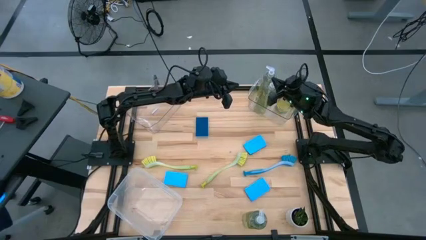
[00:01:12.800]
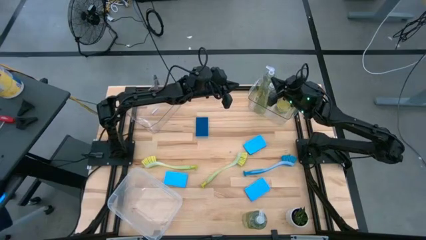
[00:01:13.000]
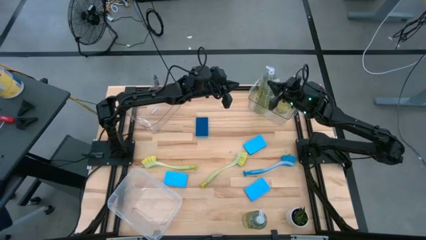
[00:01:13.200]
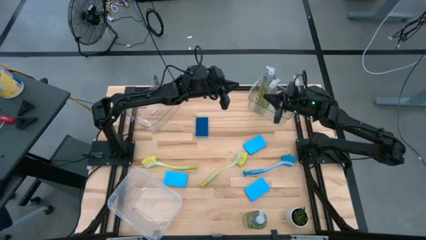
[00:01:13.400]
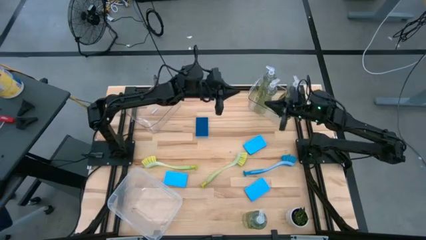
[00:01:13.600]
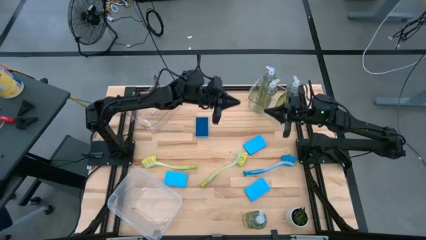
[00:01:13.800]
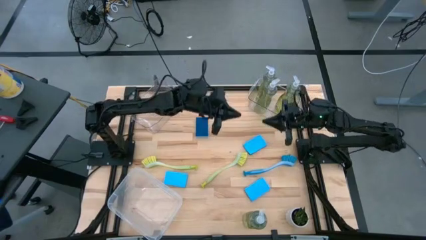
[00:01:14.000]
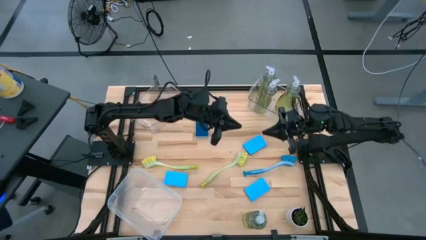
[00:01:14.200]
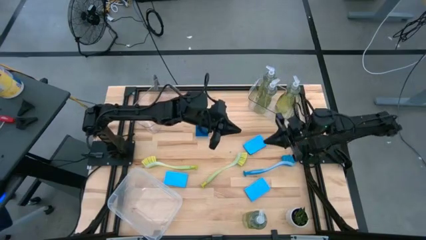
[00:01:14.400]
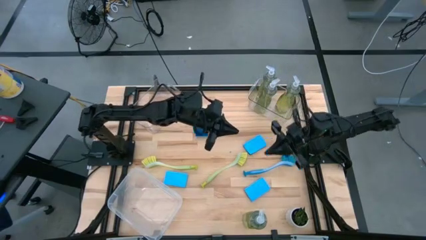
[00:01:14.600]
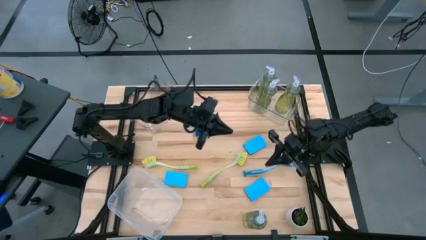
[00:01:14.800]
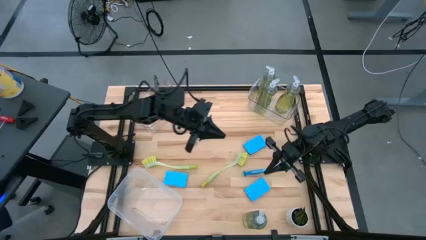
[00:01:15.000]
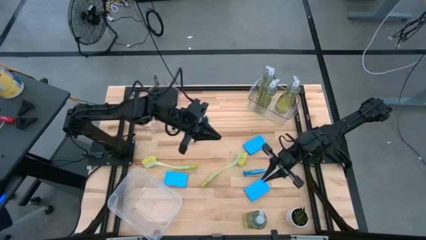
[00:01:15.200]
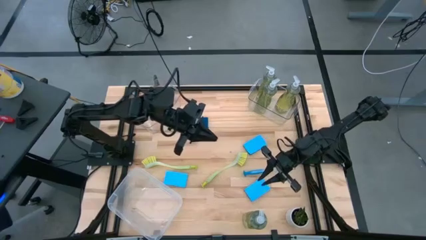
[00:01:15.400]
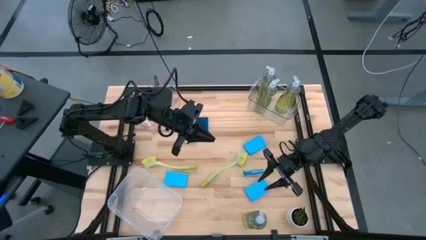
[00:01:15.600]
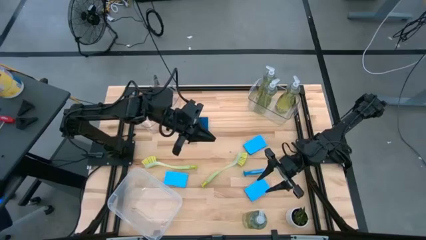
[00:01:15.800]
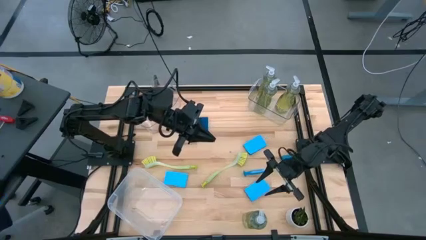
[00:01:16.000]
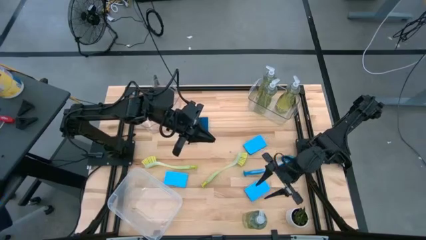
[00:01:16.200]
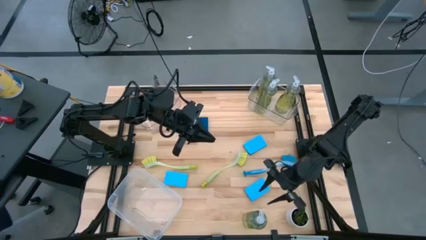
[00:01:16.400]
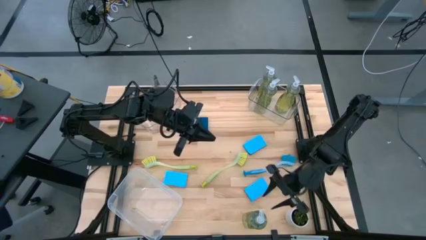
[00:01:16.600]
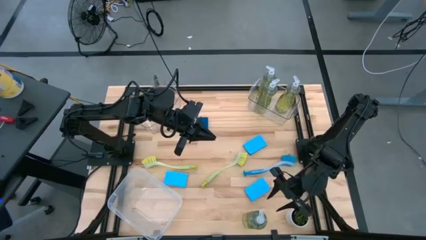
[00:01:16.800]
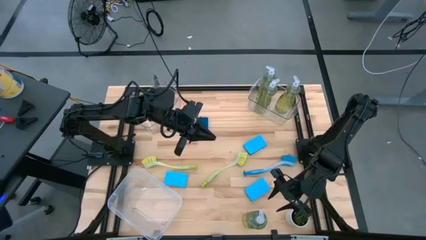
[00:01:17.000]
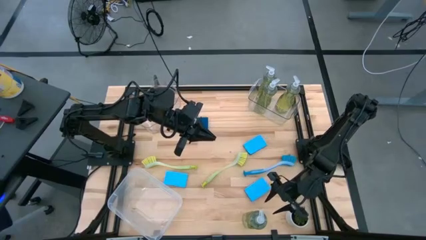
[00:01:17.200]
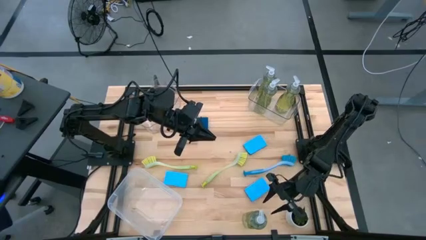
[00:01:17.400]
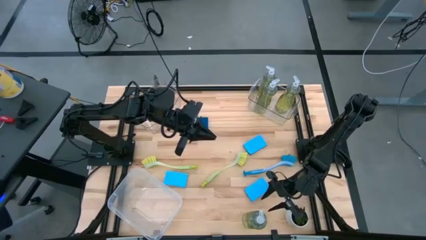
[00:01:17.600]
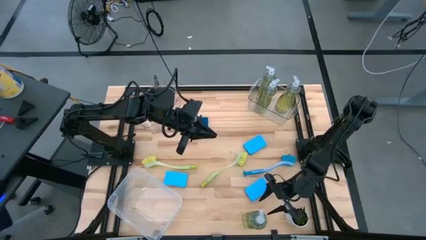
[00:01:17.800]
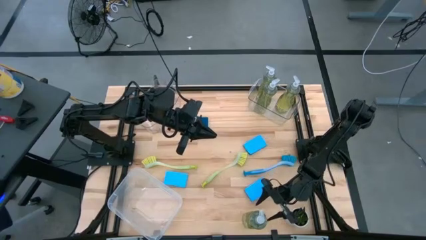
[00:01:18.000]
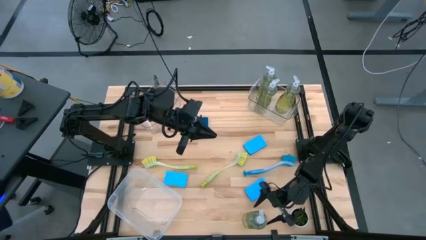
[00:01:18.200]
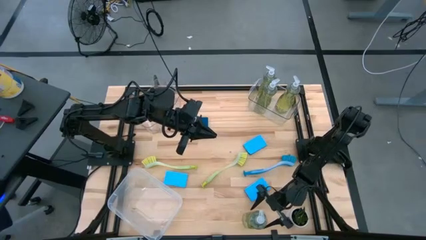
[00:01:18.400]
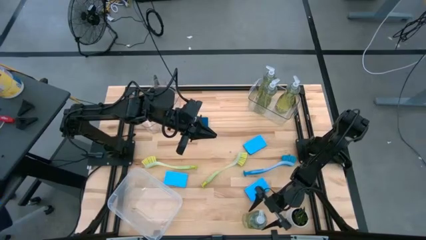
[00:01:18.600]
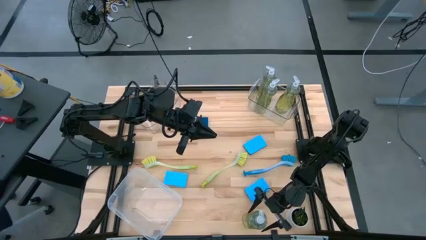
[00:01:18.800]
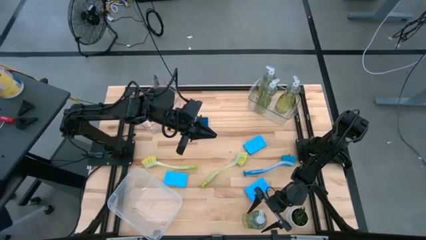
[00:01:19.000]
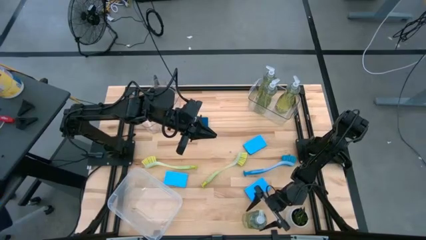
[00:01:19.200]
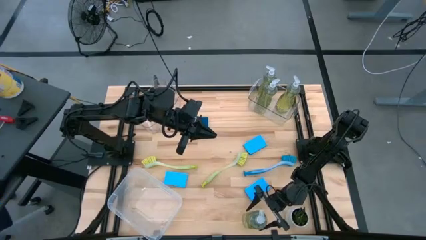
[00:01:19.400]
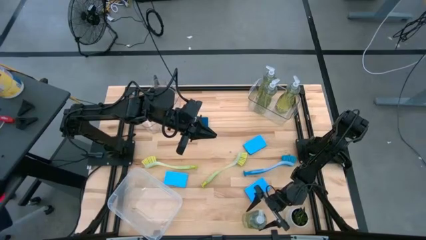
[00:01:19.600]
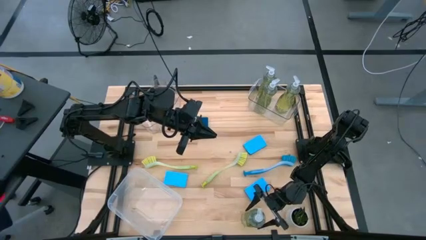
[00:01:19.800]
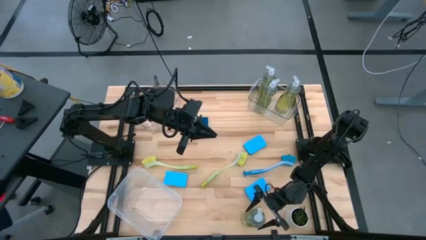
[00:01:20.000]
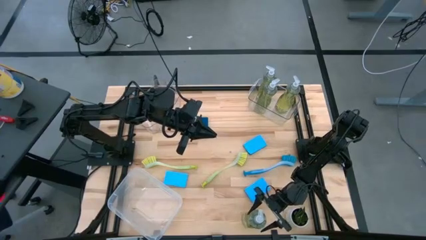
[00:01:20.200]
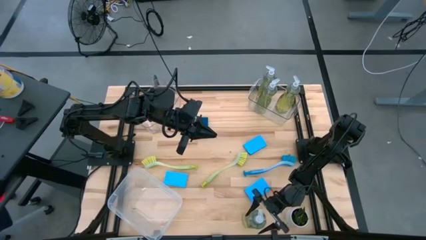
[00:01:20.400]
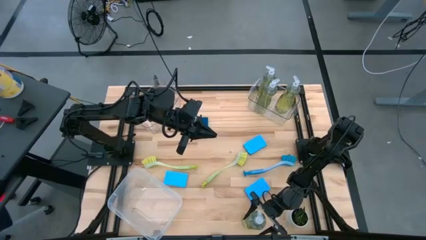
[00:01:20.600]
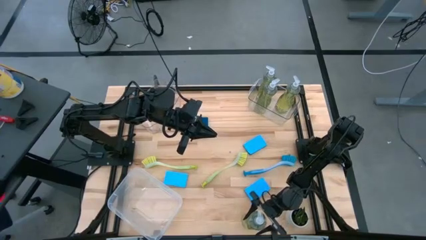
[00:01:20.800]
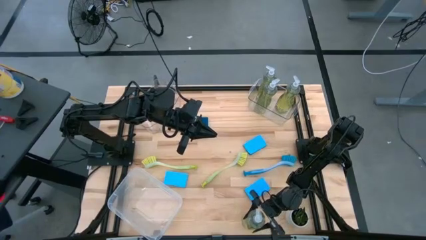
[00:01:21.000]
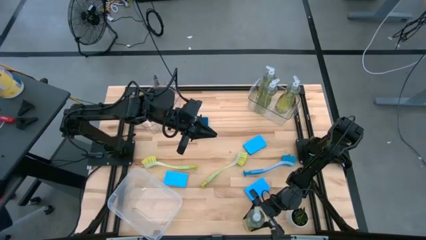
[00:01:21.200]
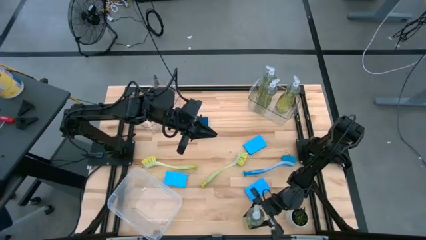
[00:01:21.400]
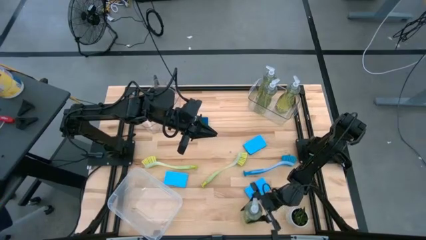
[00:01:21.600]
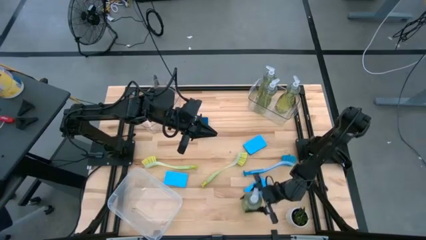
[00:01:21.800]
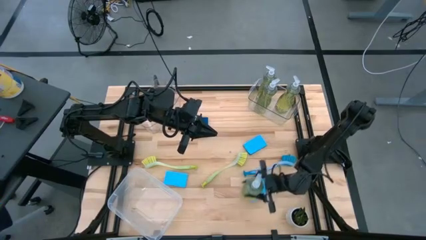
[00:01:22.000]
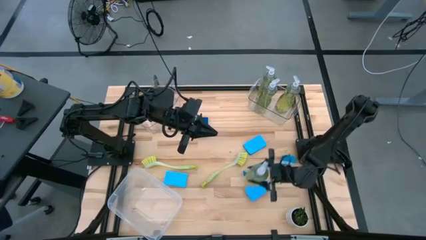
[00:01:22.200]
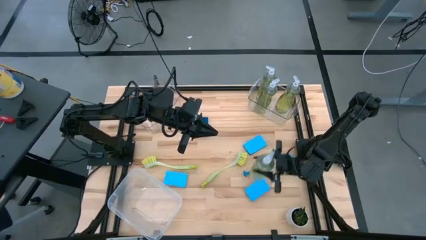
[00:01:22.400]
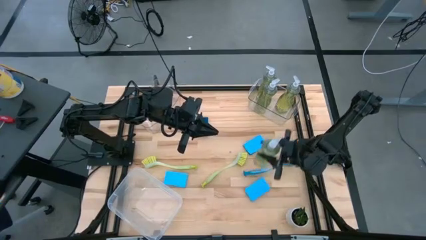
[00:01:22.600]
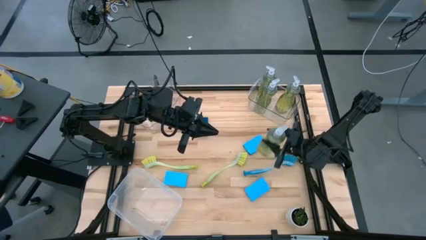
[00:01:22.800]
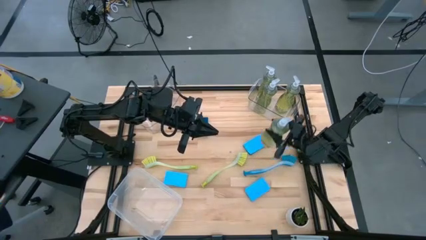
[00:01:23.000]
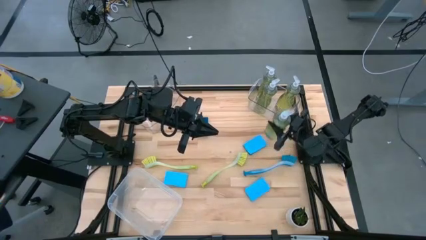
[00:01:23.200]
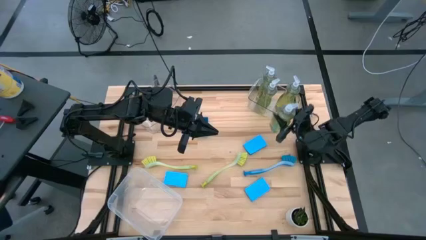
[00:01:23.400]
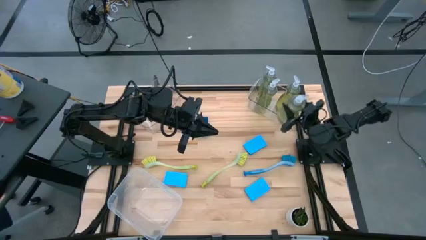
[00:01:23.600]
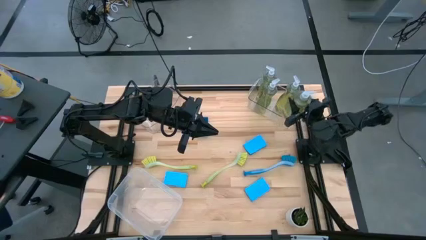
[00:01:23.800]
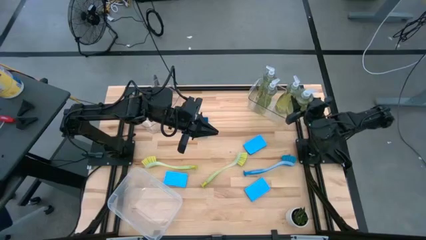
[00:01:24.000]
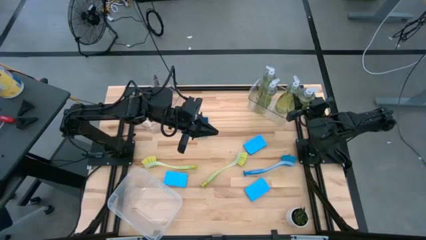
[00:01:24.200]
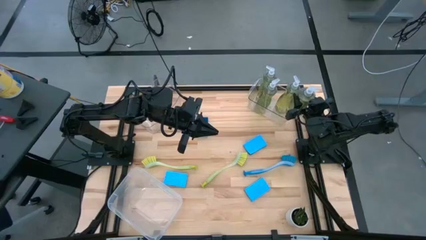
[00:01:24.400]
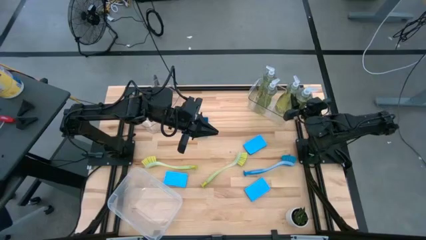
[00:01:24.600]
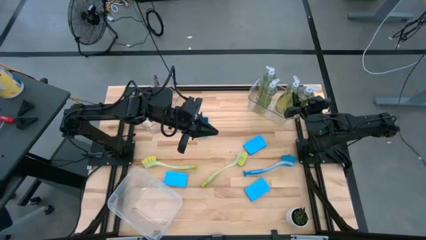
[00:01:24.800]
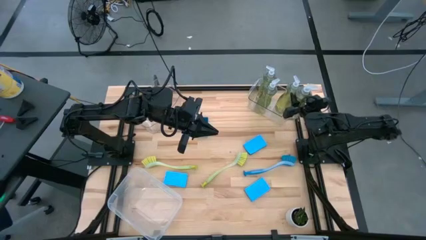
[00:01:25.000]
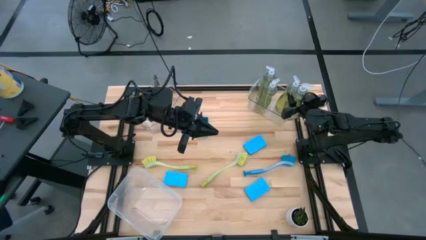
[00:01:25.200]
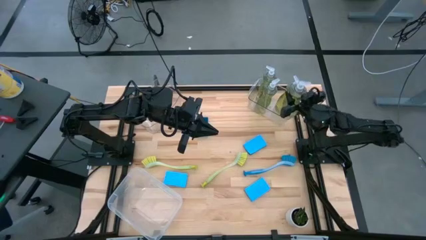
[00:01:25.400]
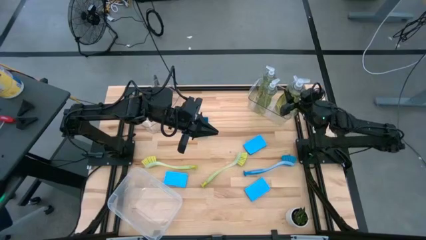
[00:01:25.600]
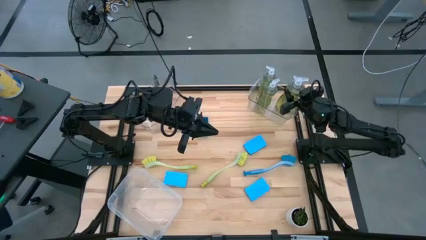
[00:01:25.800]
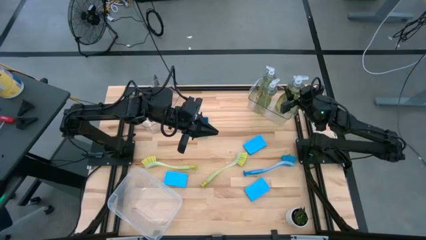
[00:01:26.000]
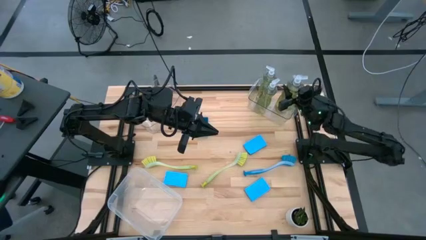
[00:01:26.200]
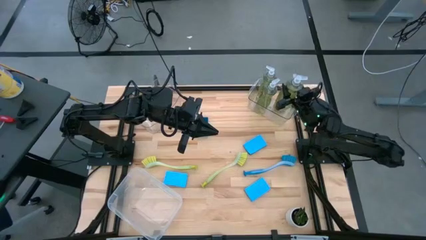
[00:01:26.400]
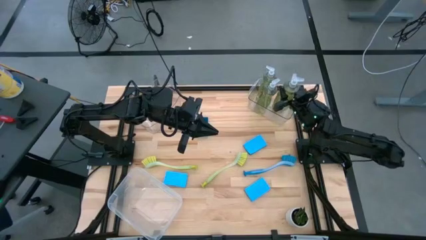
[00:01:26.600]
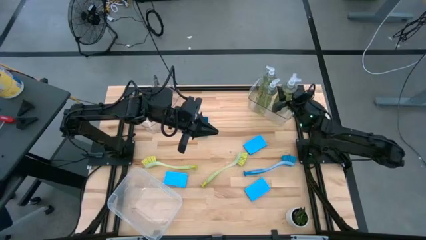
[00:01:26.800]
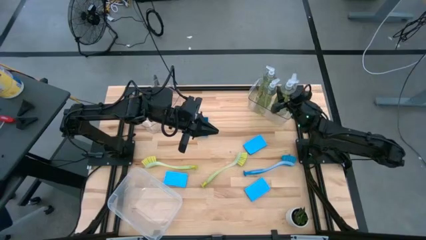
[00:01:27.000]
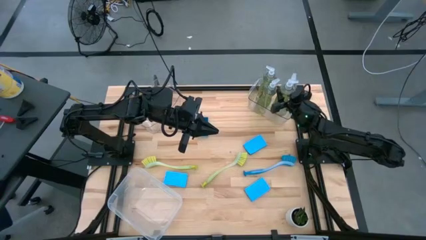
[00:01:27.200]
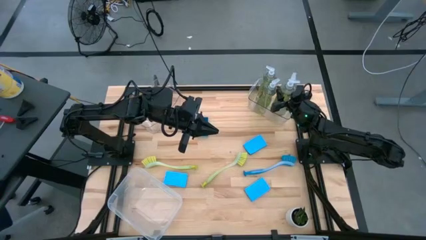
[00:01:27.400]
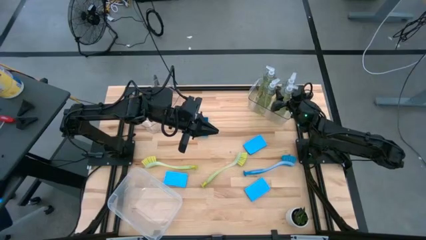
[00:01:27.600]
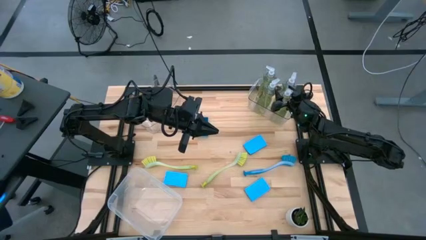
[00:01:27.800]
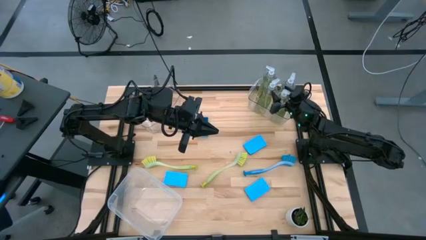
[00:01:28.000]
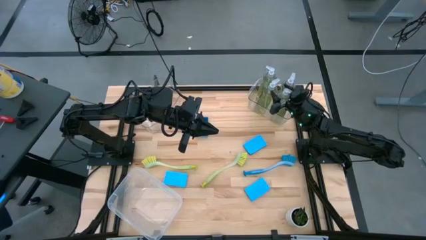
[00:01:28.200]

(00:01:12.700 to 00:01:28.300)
Task: Pick & Place Kitchen Sink Supplies
Put the yellow dish soap bottle into the right transparent bin
